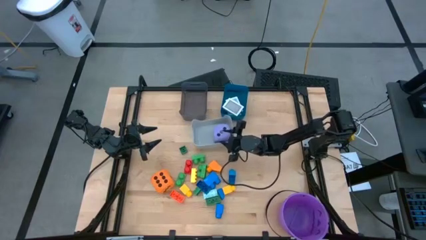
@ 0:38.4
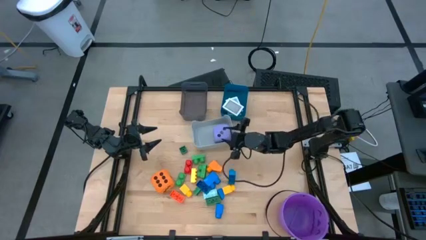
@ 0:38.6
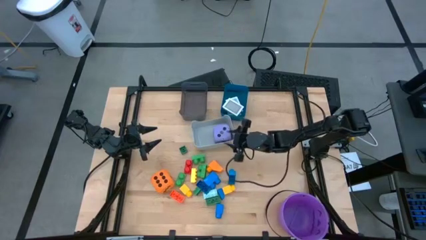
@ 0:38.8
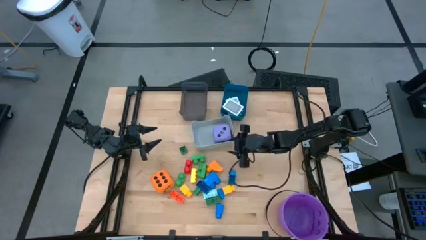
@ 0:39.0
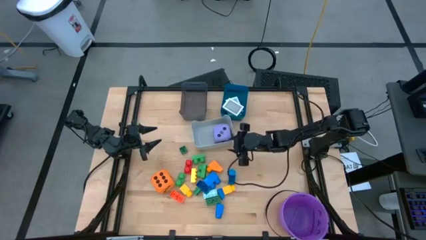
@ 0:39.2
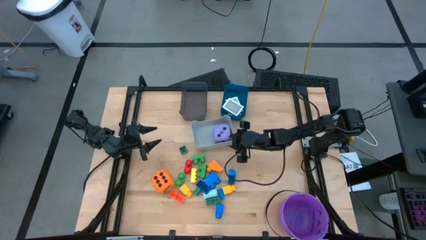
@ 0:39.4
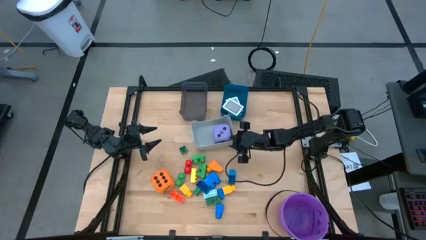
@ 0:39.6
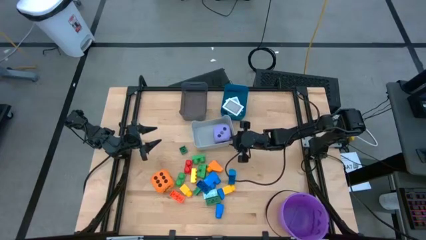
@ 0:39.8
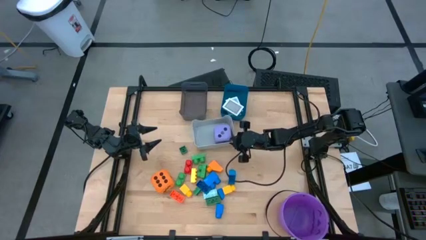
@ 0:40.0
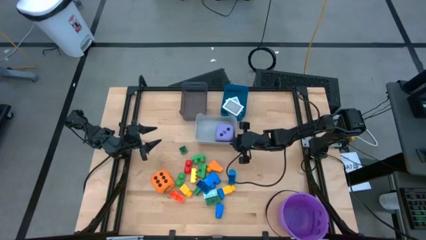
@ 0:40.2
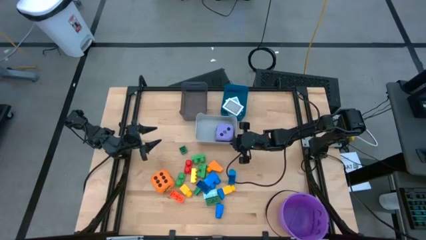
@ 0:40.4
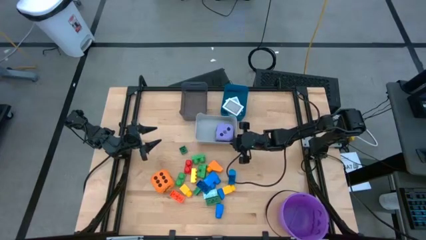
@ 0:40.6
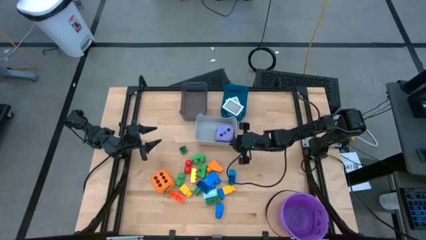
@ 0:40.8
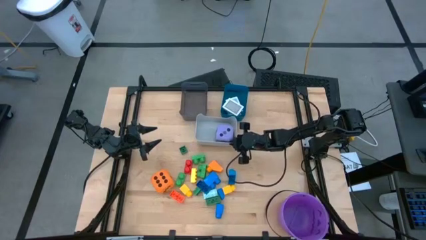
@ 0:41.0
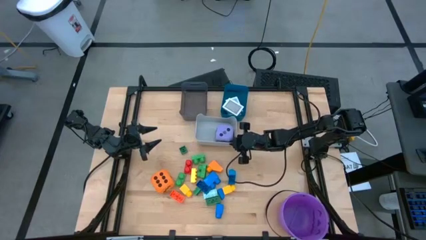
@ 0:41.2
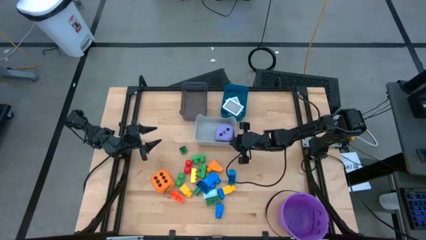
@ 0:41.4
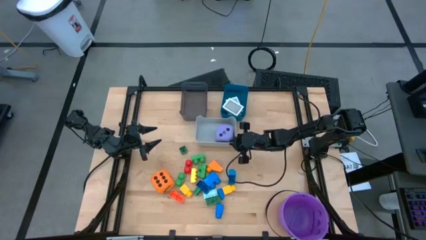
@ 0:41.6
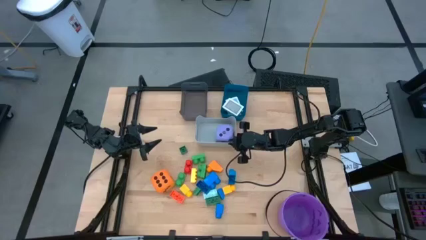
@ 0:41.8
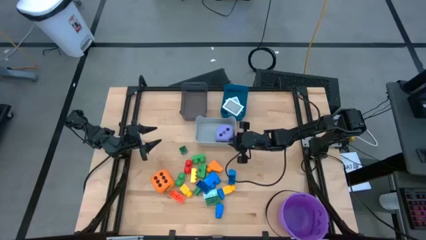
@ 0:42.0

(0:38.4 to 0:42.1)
Task: Pick & Place Toys
Adjust the gray bin

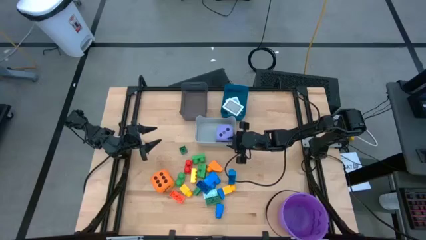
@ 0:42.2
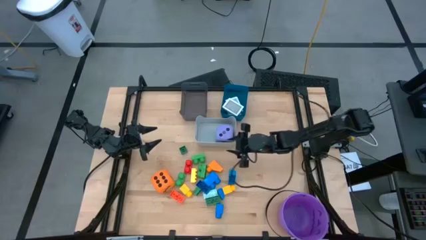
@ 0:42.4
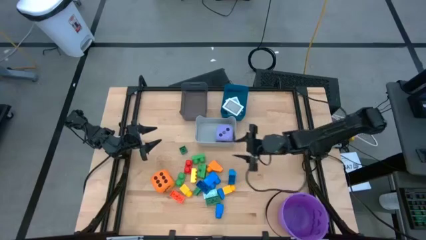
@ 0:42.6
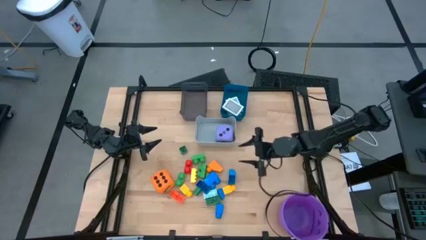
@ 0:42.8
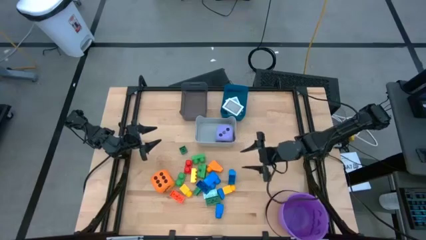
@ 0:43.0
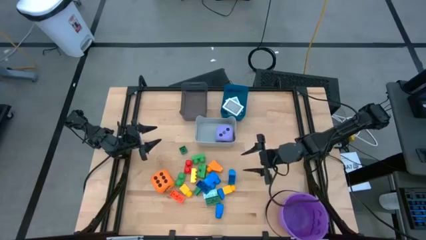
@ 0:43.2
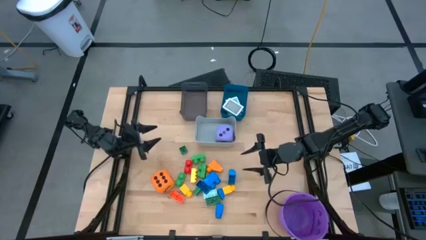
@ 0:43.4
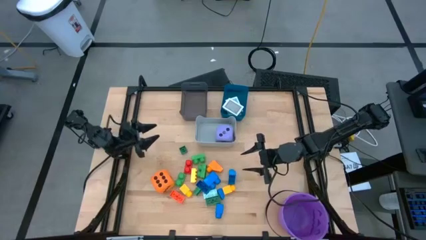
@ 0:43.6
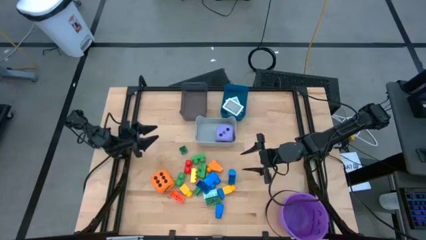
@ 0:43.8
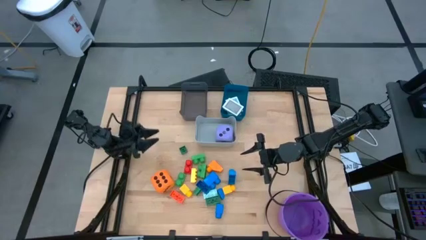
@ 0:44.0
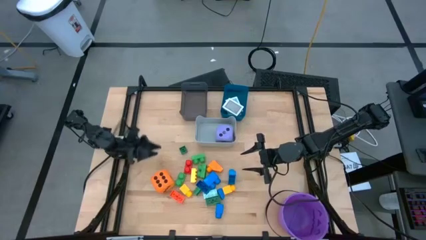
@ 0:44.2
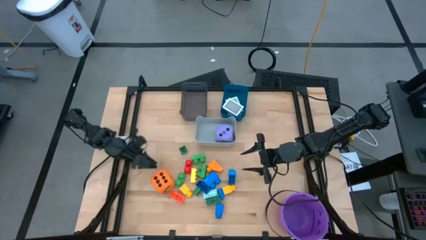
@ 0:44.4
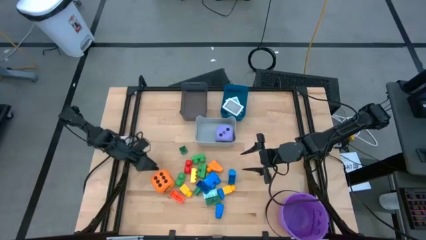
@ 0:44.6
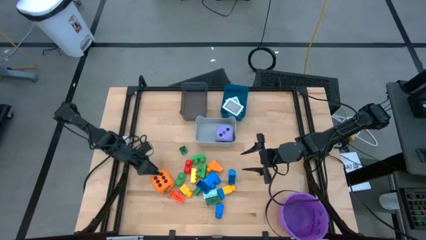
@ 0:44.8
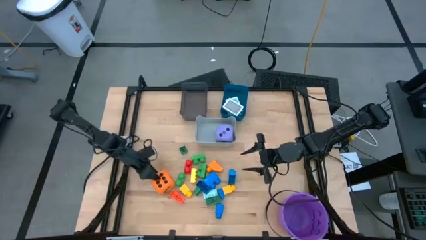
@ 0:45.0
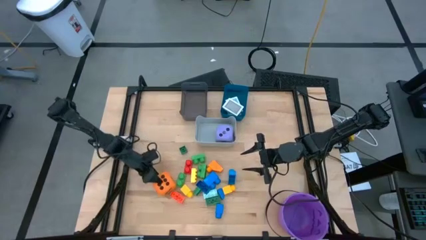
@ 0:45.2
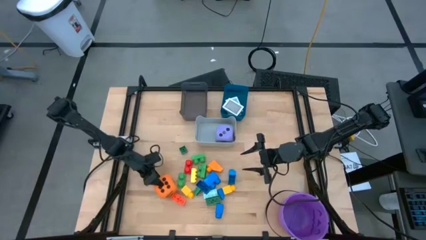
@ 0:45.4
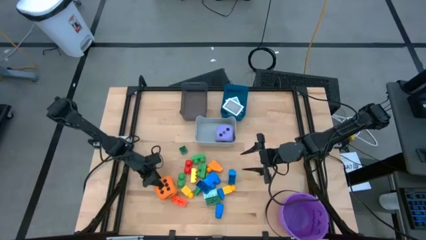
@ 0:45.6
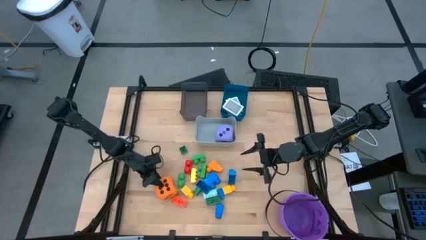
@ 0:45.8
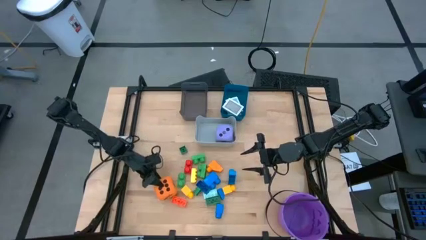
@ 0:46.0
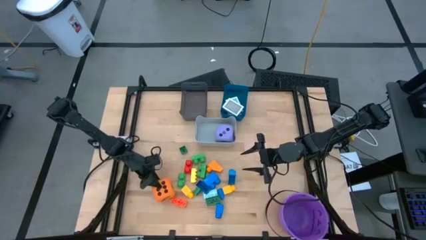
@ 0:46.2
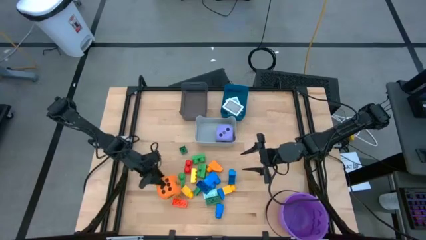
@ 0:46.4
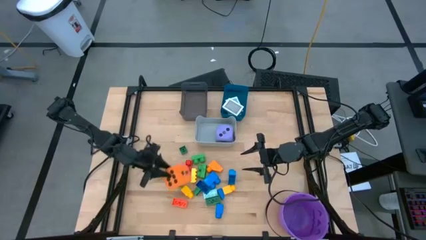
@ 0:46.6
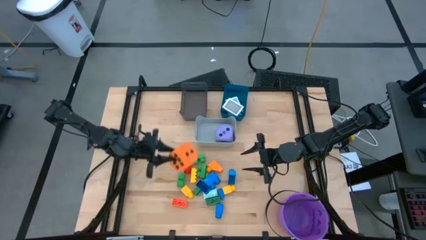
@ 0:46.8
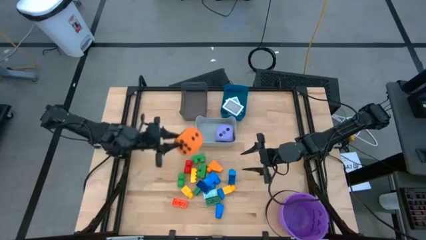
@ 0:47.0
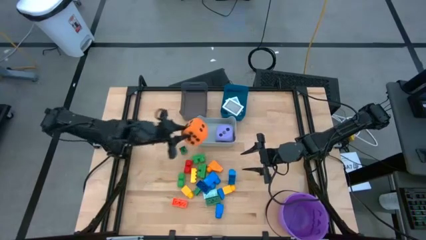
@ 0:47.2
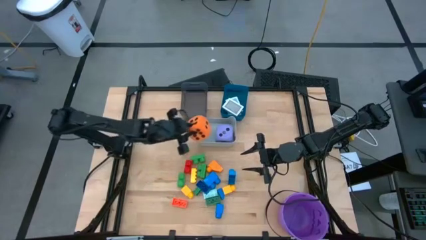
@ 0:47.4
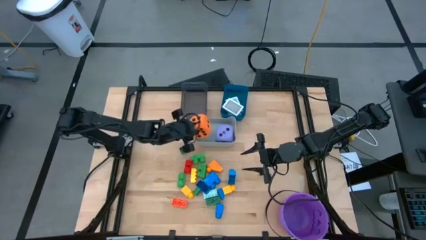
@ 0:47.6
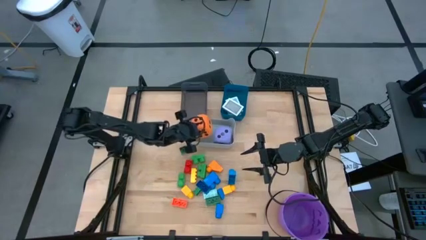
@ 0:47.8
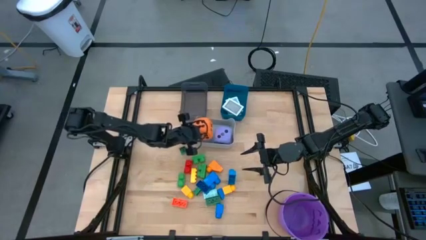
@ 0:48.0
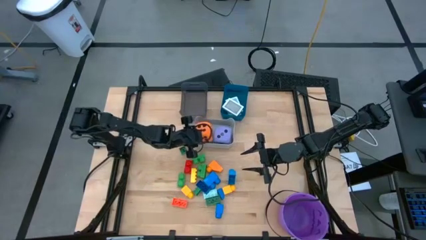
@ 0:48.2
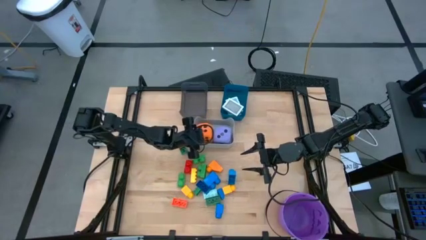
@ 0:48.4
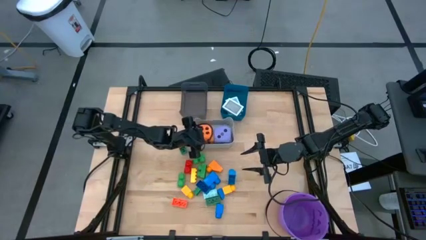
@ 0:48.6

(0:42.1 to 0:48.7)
Put the orange game dice into the gray bin

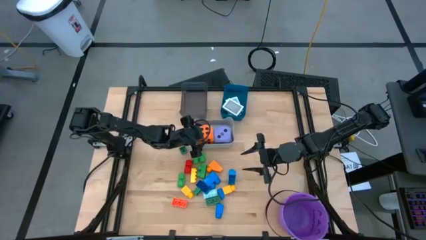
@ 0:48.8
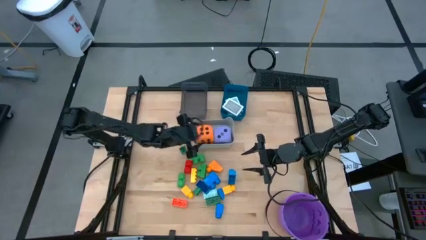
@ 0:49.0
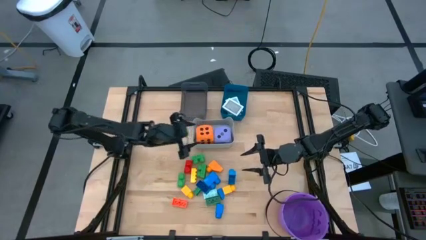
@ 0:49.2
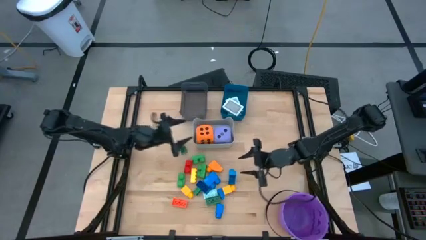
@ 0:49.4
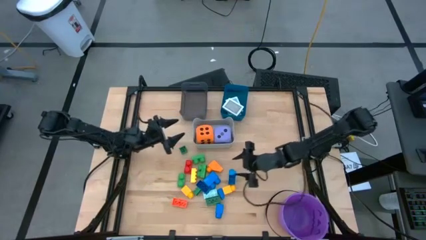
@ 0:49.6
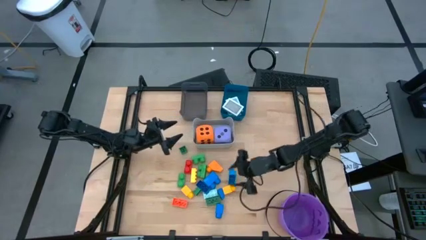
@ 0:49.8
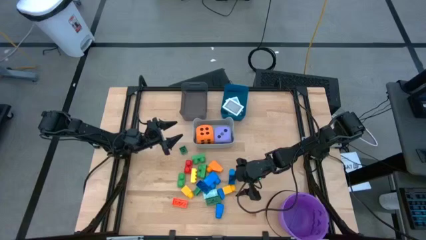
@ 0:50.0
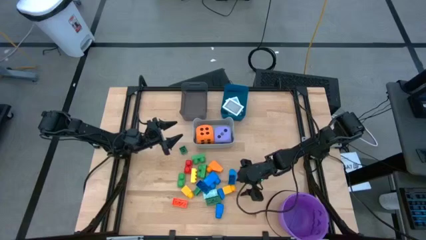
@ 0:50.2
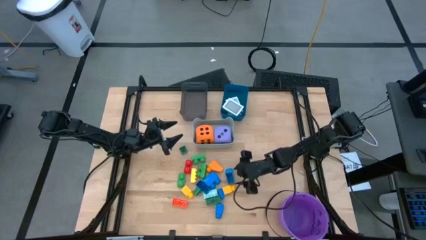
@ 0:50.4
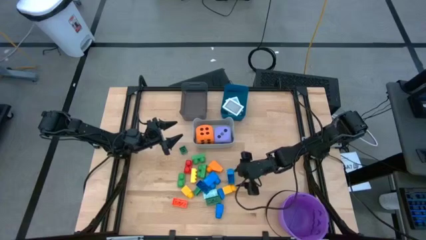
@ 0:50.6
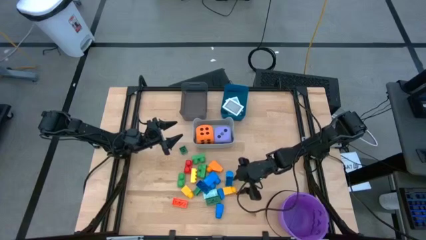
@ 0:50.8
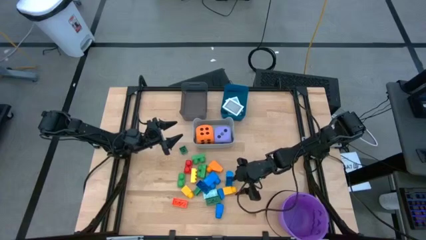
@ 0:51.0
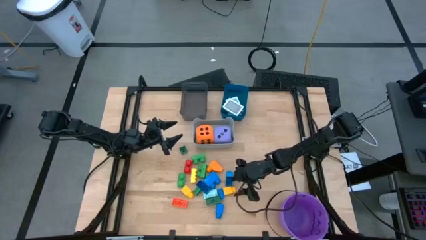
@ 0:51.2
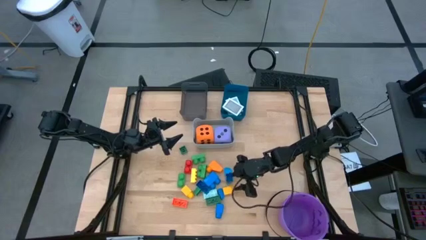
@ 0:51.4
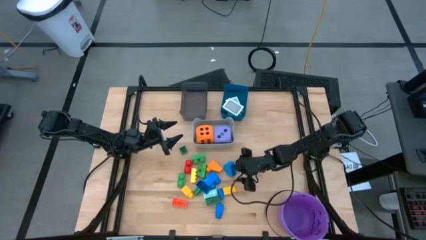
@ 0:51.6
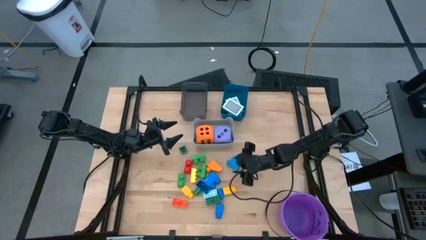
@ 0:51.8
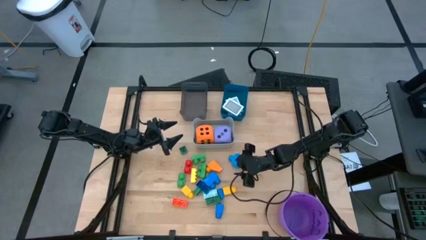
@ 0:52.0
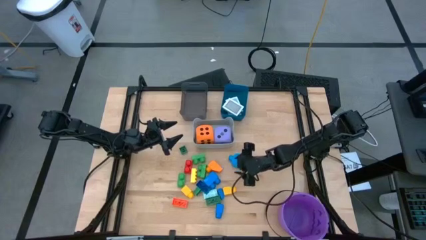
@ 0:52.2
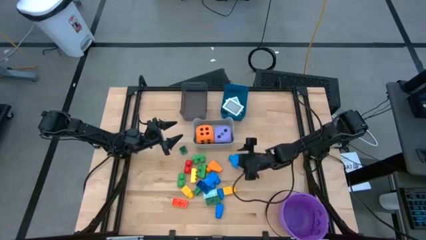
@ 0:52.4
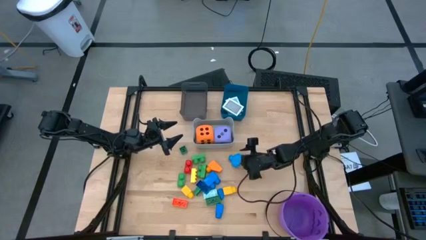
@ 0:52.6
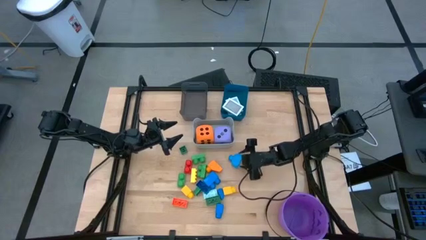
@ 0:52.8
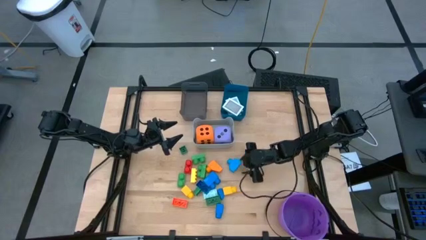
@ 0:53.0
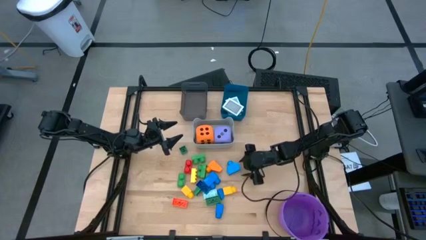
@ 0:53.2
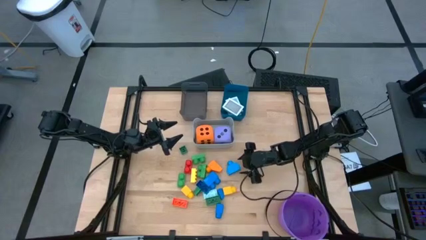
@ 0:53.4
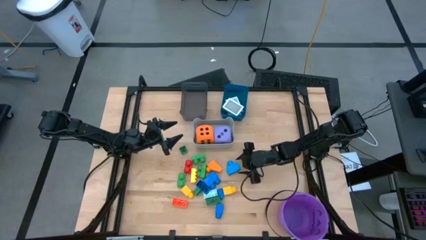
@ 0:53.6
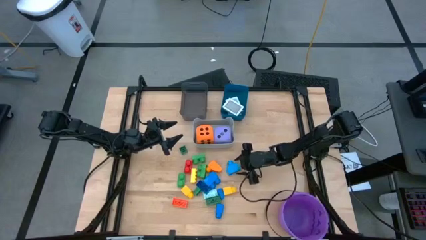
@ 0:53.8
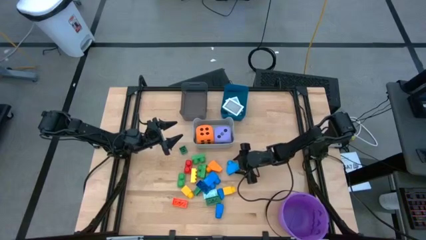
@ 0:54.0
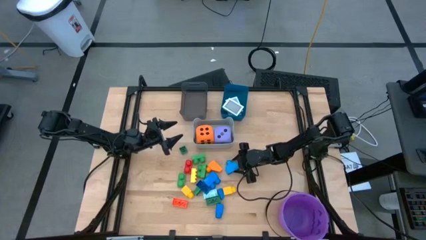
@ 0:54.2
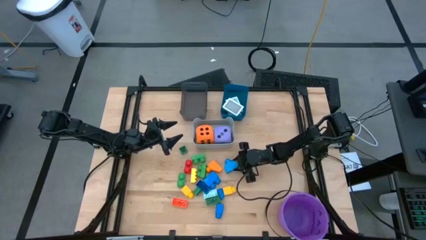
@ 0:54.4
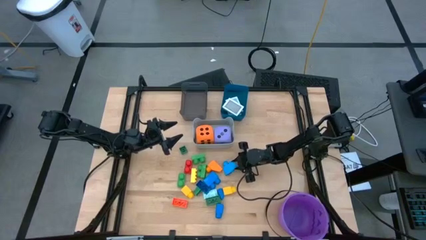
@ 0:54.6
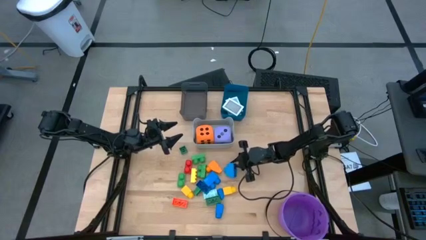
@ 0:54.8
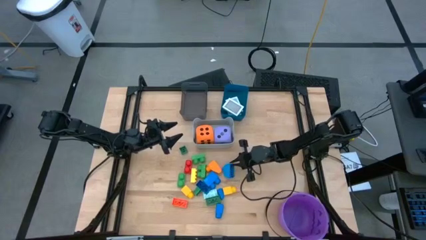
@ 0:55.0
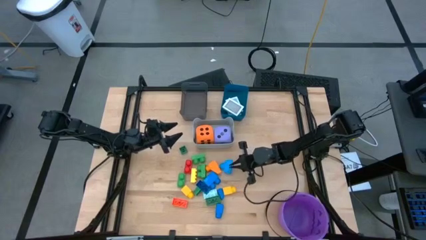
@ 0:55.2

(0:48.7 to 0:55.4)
Put the blue game piece into the black bin
